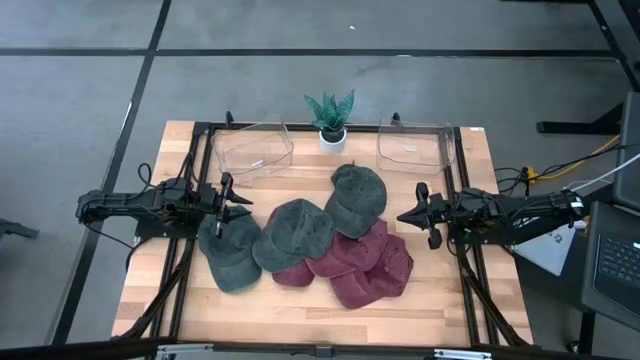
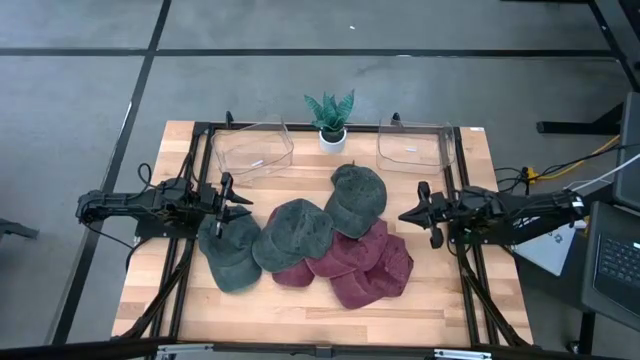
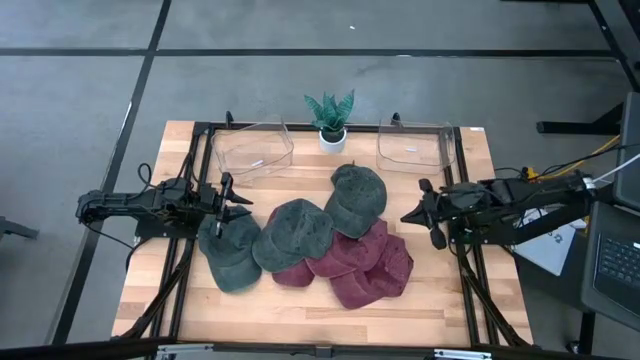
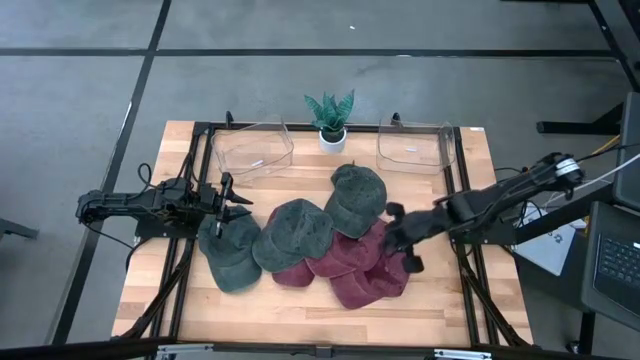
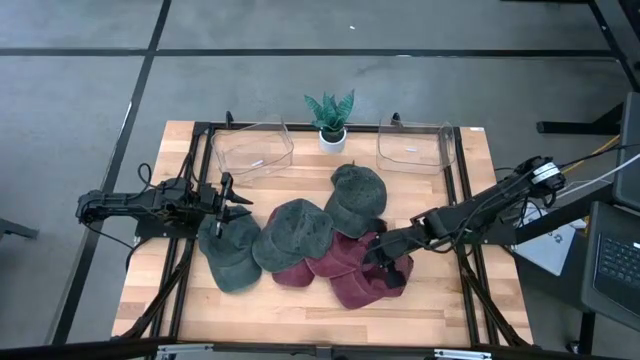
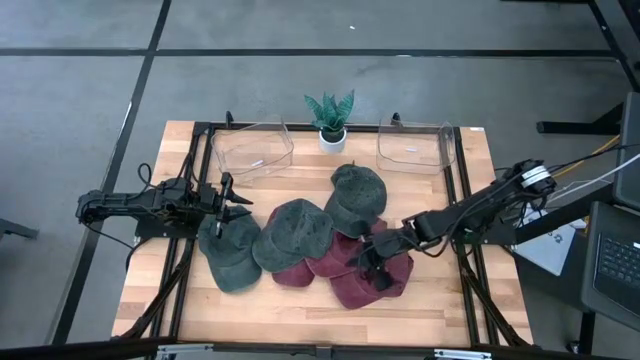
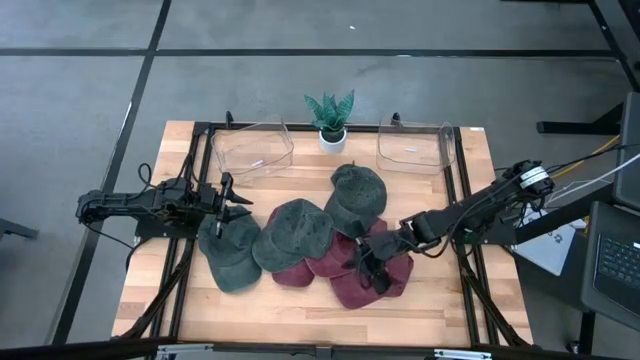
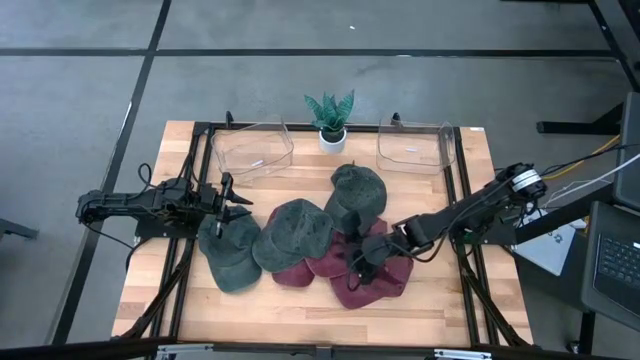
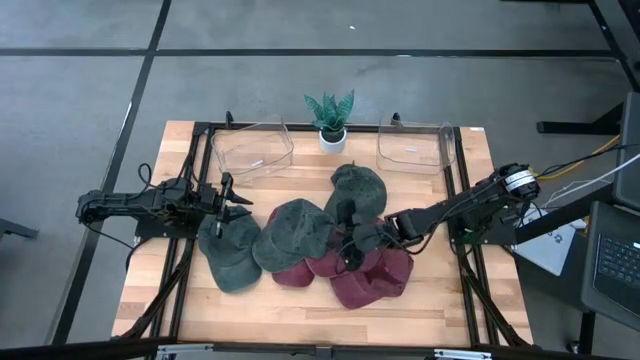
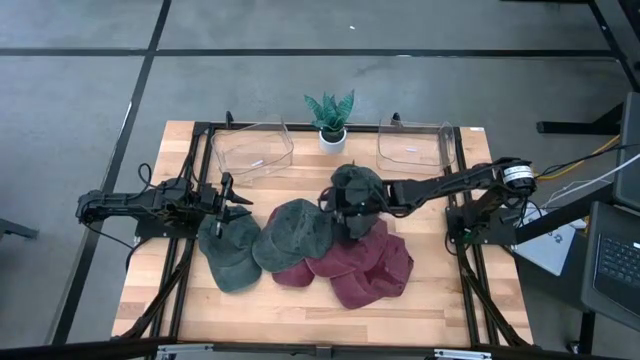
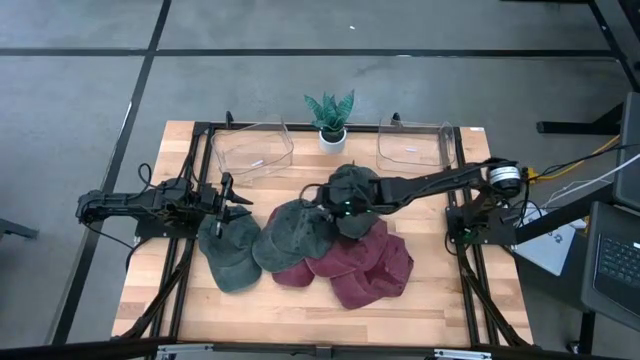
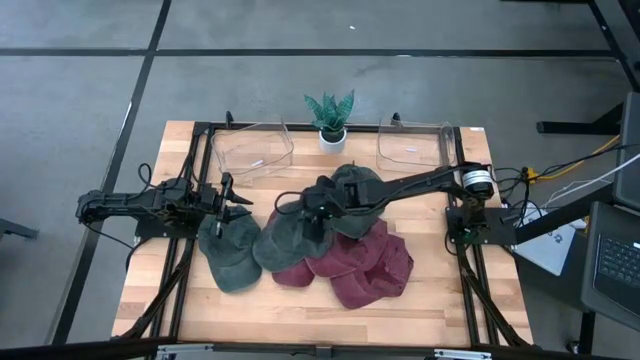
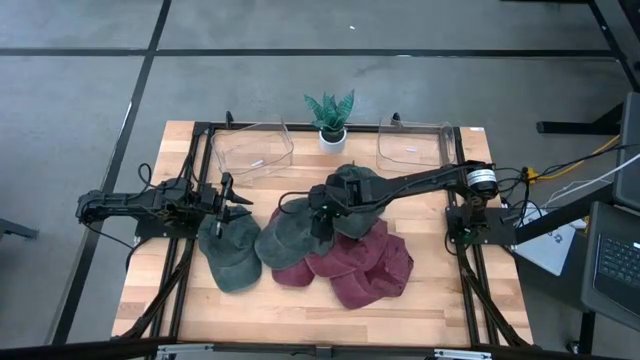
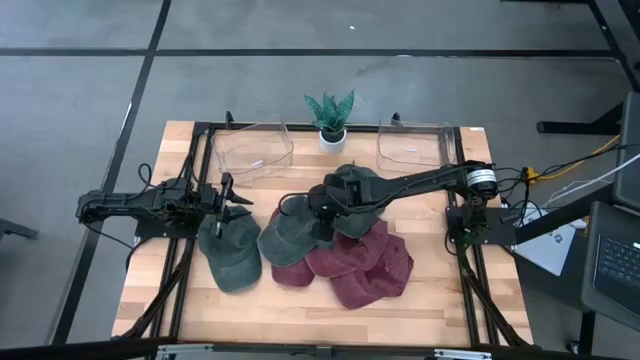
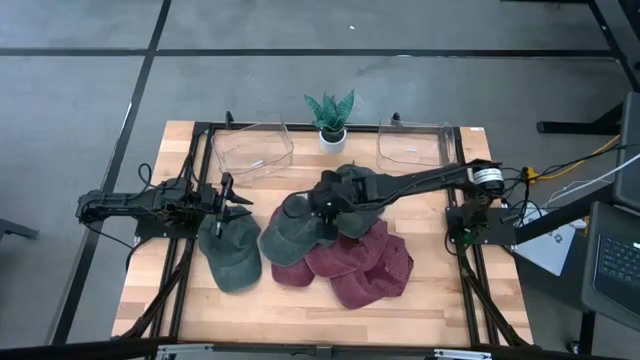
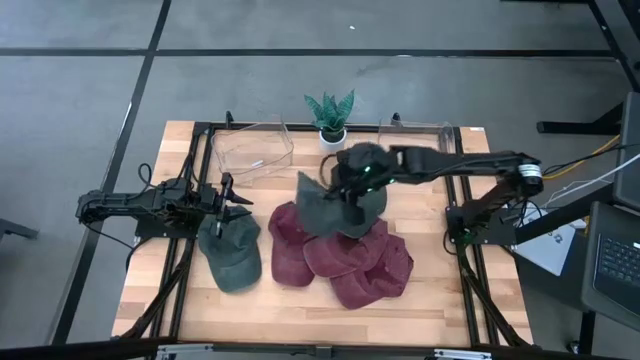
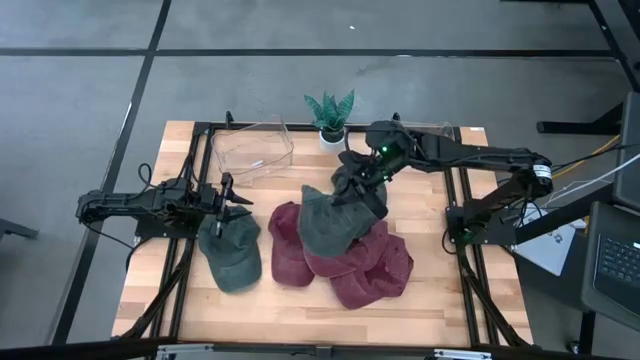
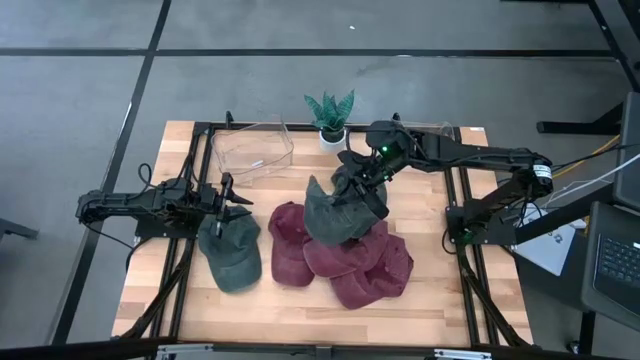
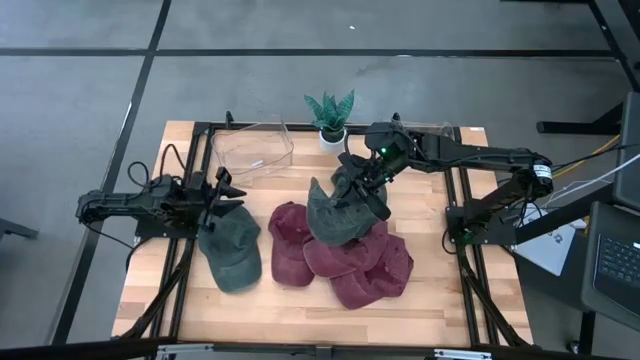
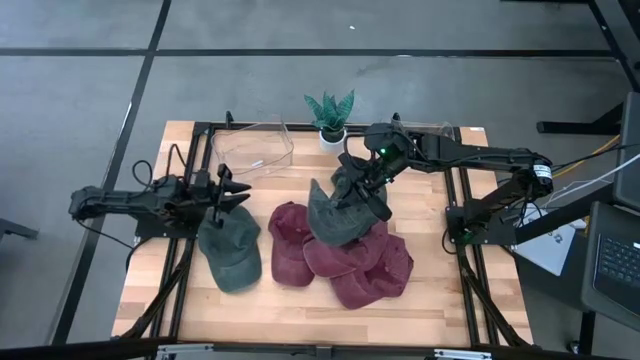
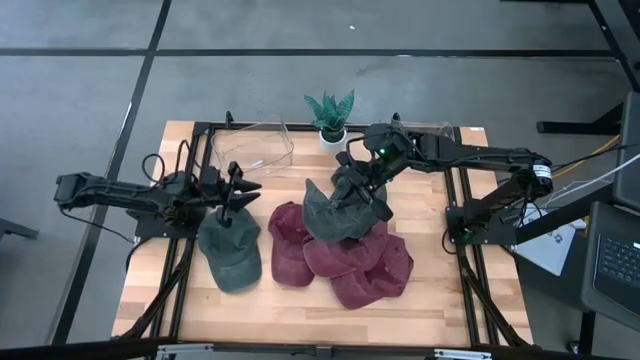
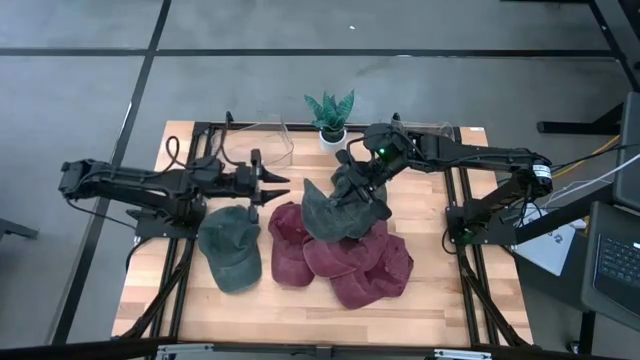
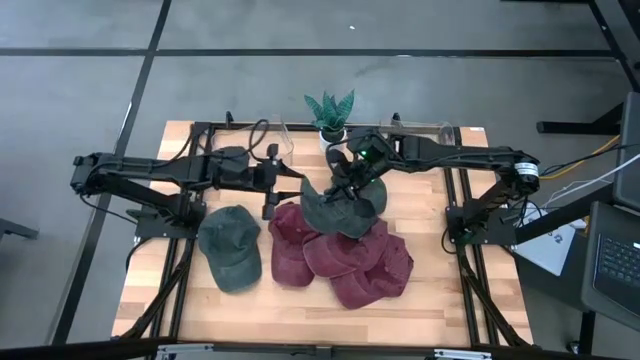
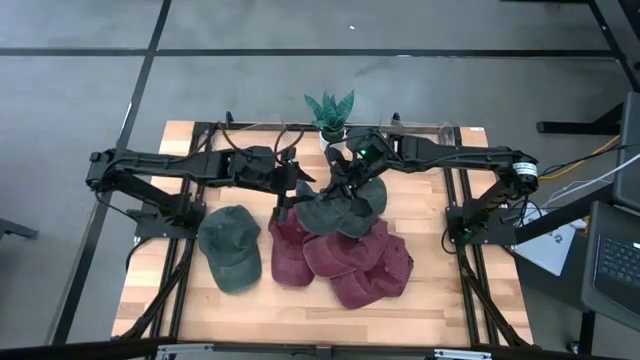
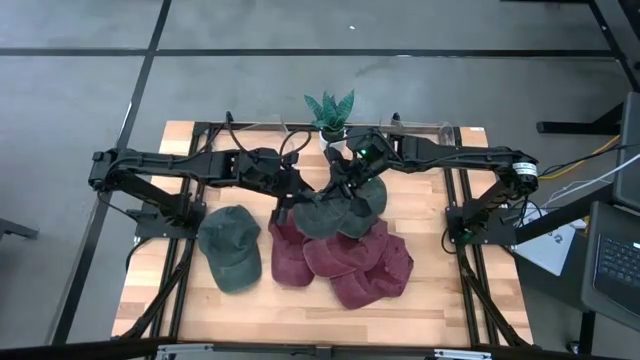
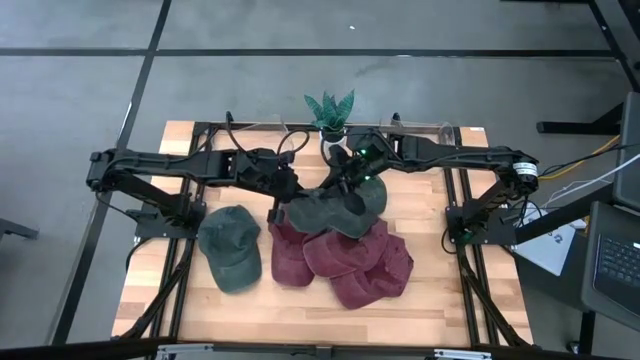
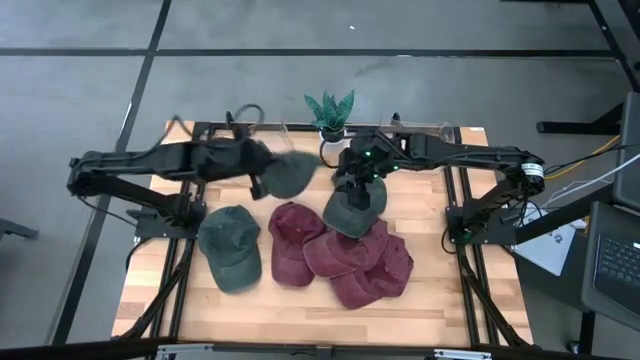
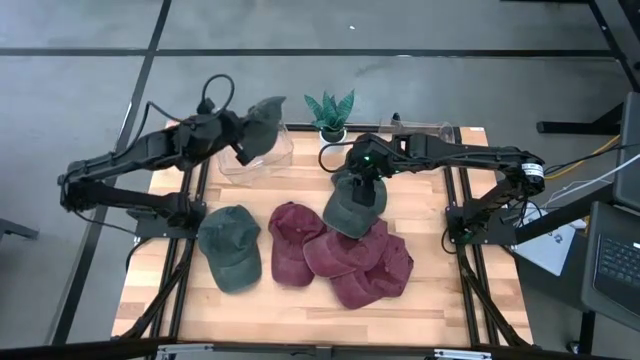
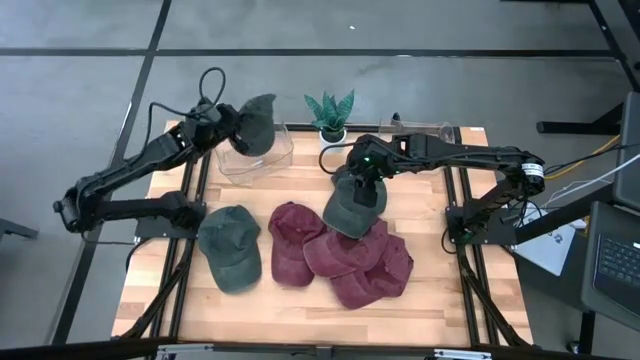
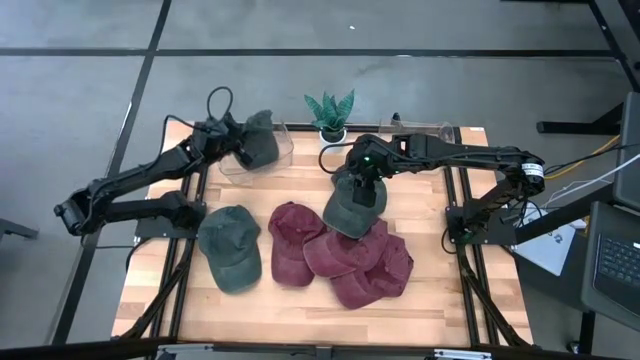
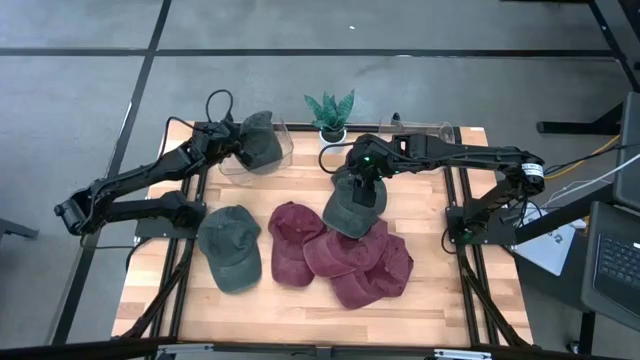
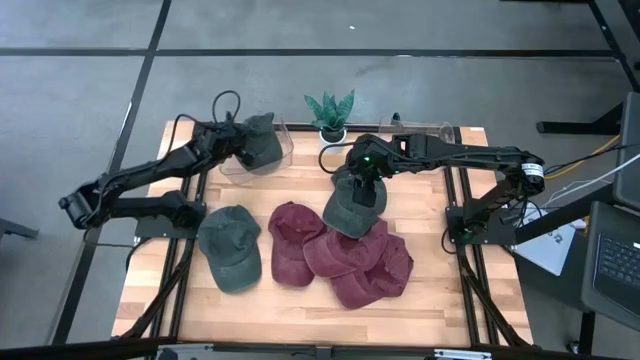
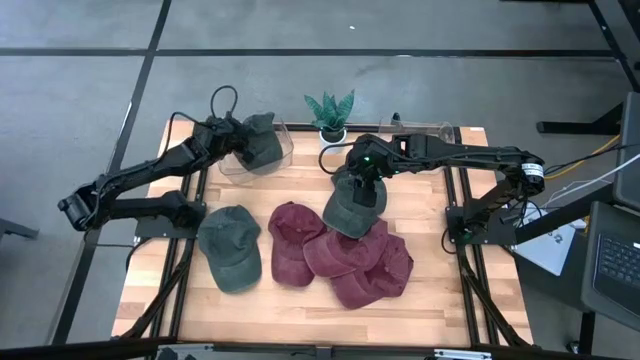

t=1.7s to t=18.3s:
Task: Pick & Place hat
Put the middle black cap into the left transparent bin
